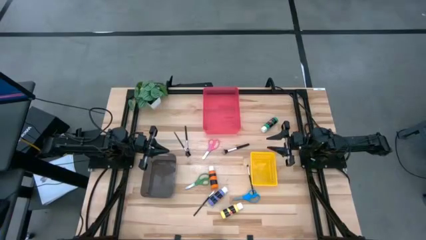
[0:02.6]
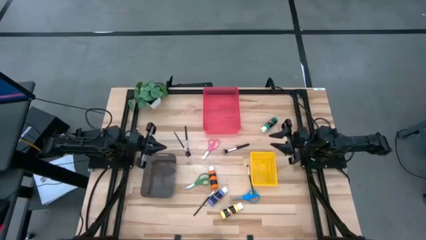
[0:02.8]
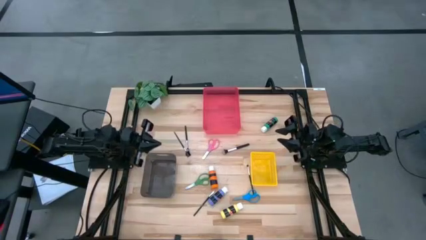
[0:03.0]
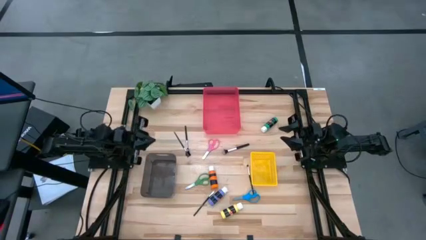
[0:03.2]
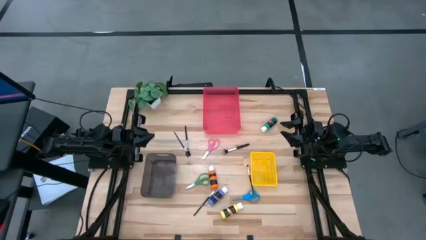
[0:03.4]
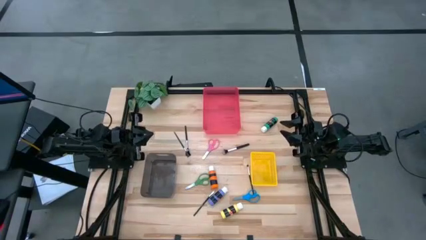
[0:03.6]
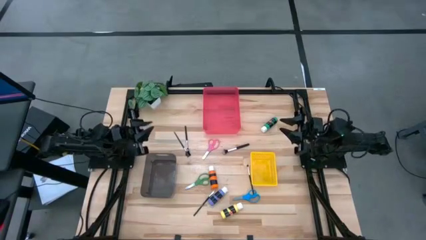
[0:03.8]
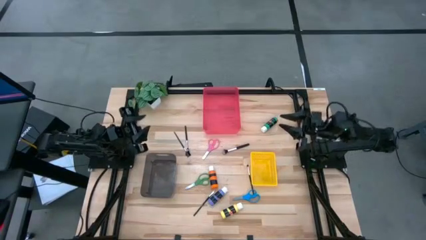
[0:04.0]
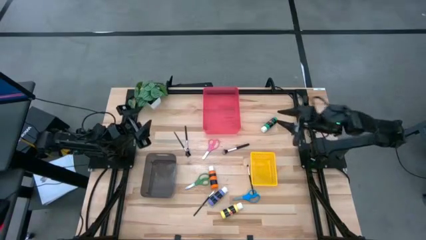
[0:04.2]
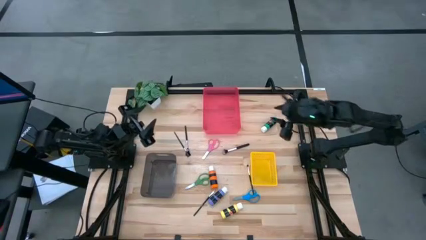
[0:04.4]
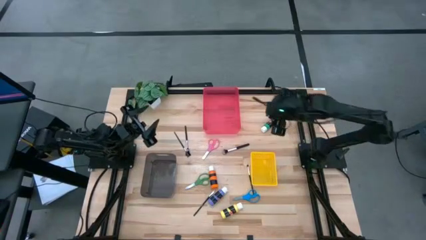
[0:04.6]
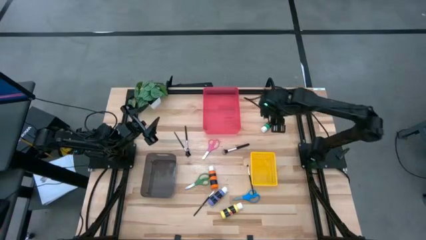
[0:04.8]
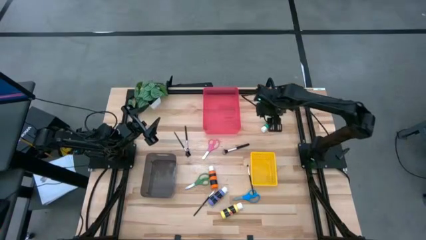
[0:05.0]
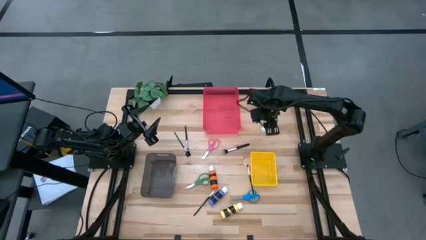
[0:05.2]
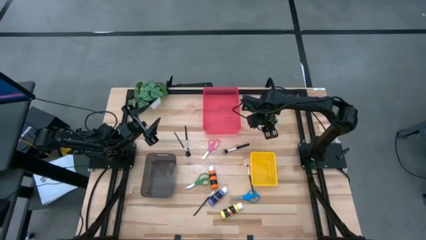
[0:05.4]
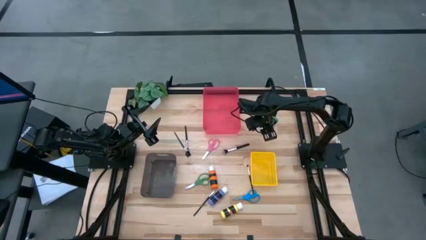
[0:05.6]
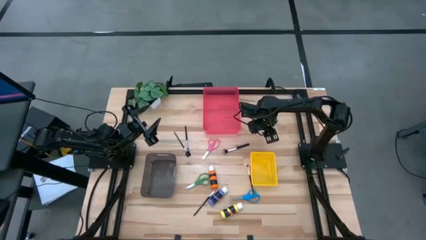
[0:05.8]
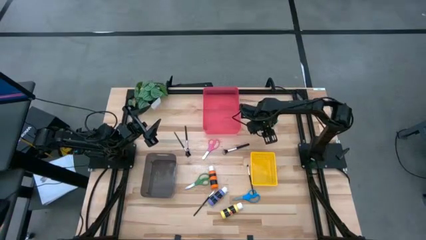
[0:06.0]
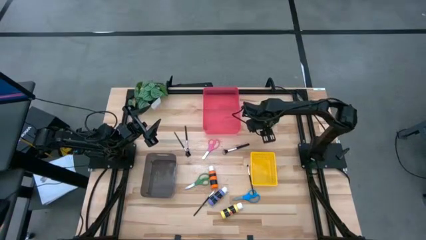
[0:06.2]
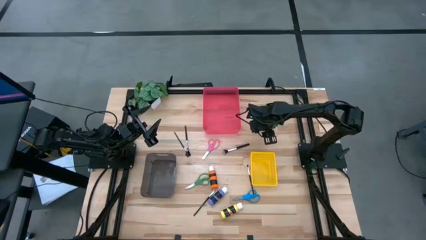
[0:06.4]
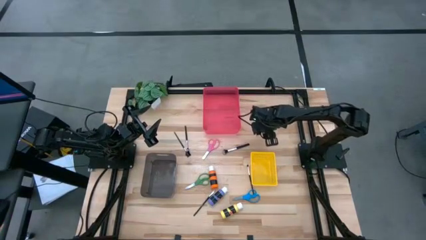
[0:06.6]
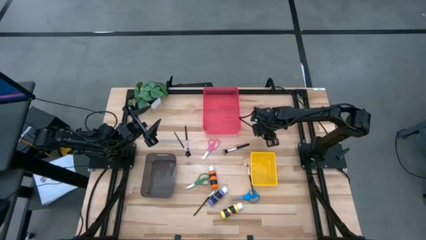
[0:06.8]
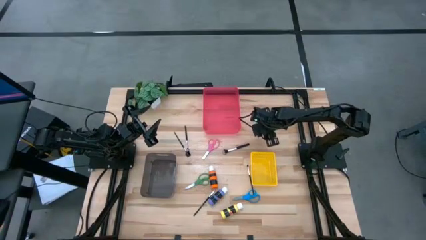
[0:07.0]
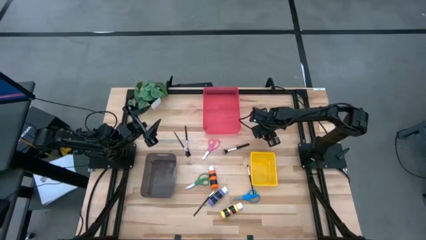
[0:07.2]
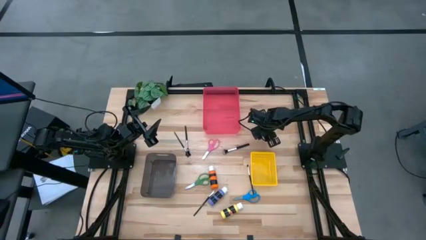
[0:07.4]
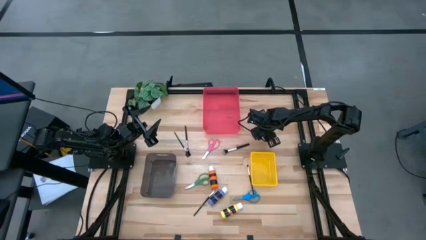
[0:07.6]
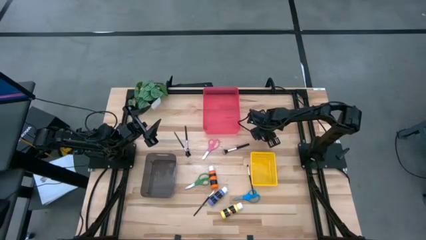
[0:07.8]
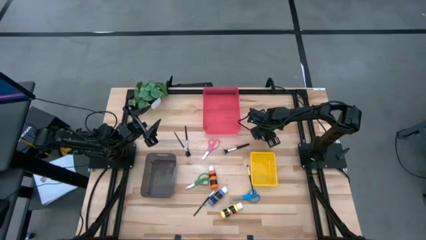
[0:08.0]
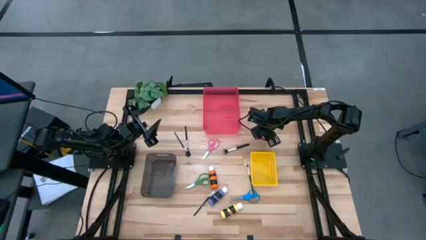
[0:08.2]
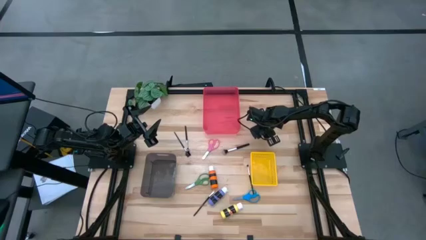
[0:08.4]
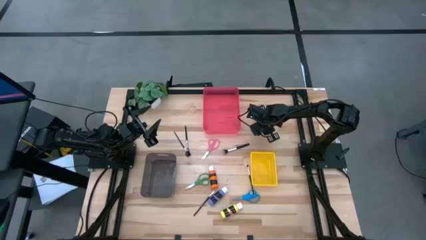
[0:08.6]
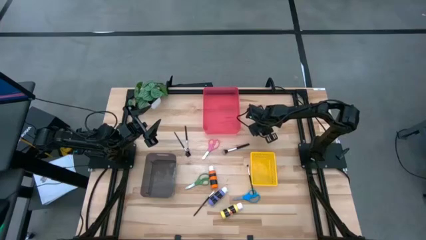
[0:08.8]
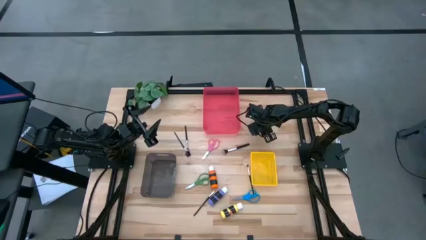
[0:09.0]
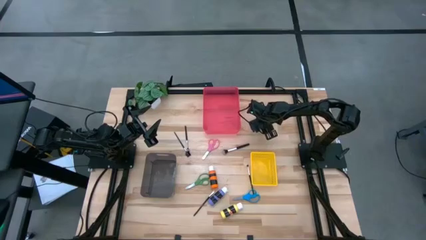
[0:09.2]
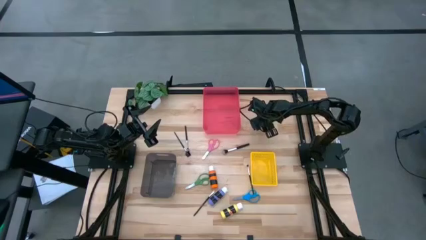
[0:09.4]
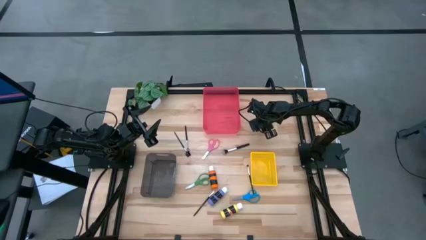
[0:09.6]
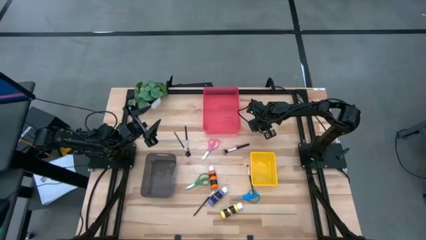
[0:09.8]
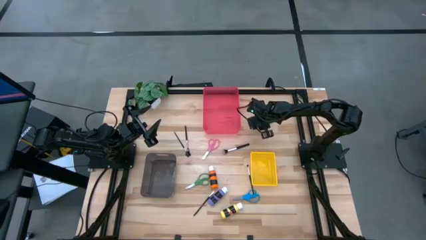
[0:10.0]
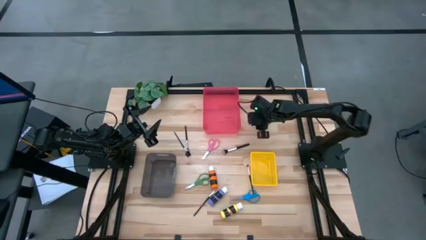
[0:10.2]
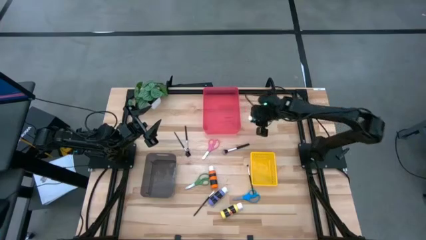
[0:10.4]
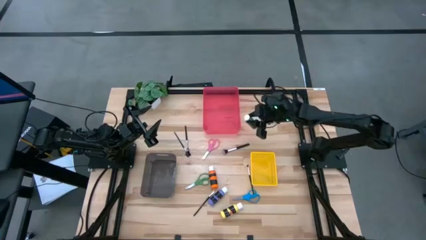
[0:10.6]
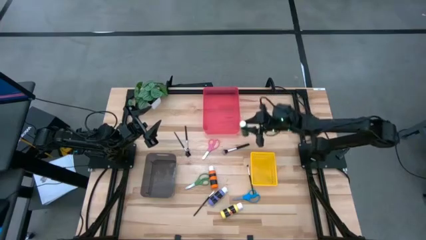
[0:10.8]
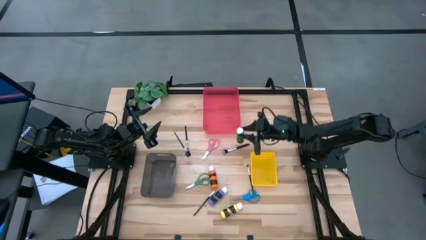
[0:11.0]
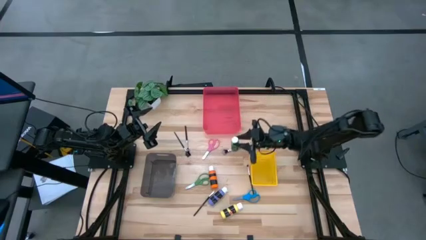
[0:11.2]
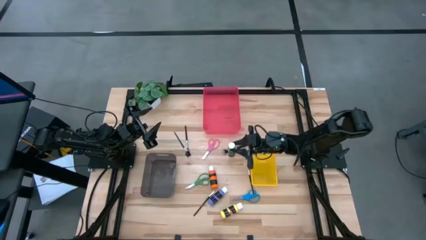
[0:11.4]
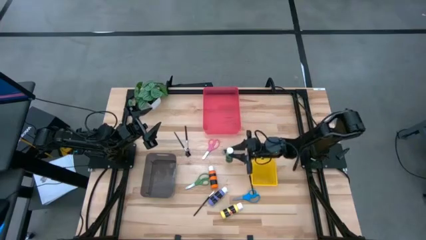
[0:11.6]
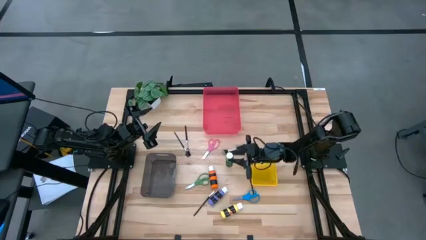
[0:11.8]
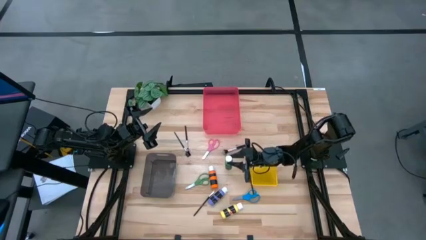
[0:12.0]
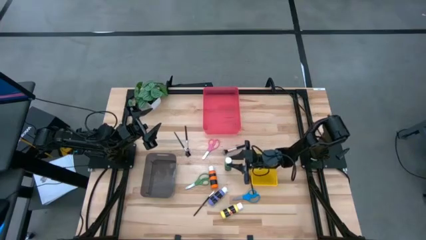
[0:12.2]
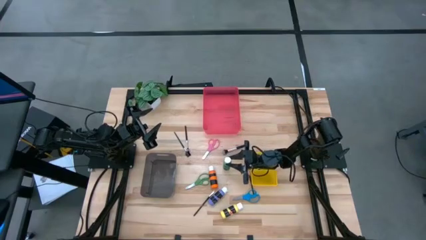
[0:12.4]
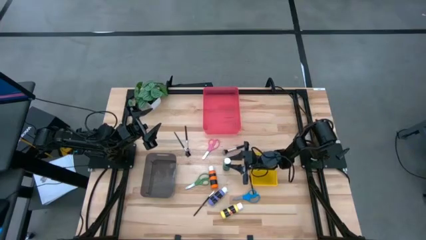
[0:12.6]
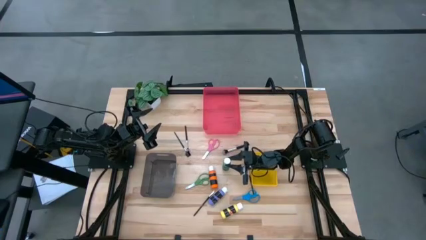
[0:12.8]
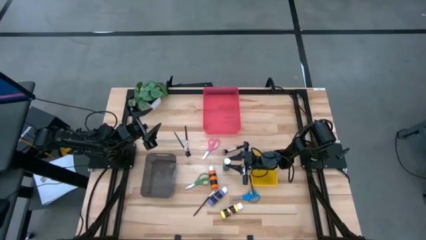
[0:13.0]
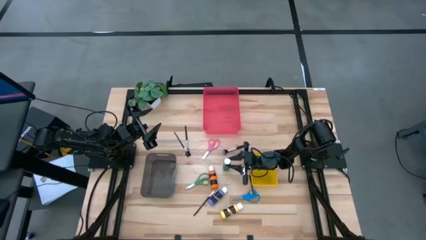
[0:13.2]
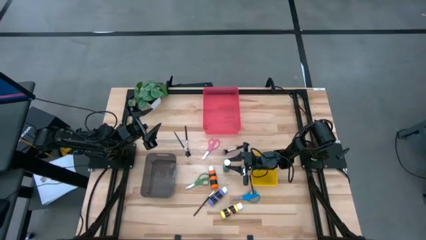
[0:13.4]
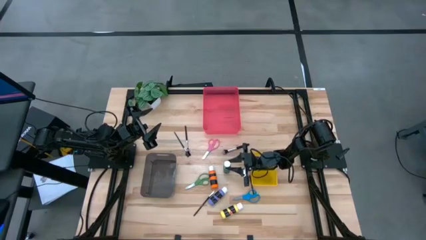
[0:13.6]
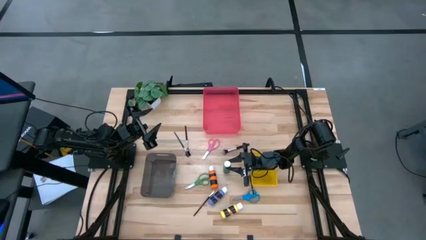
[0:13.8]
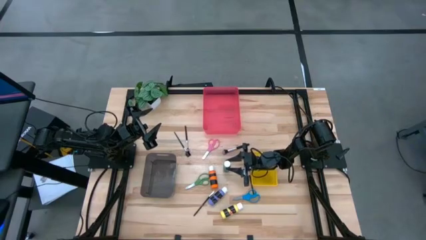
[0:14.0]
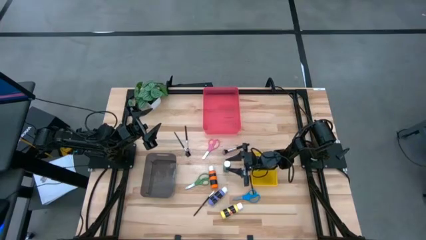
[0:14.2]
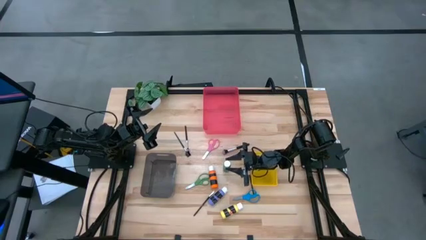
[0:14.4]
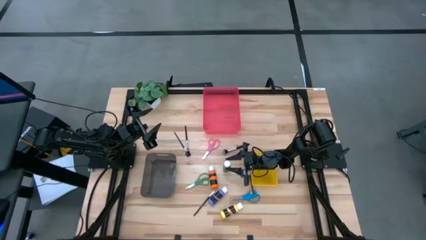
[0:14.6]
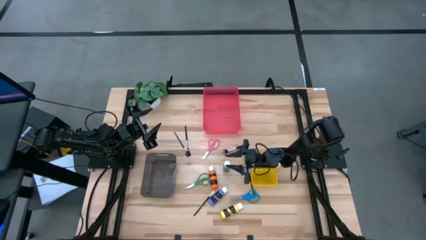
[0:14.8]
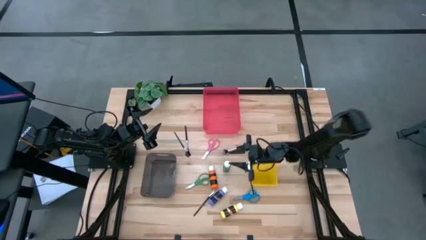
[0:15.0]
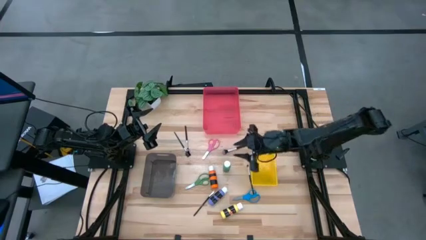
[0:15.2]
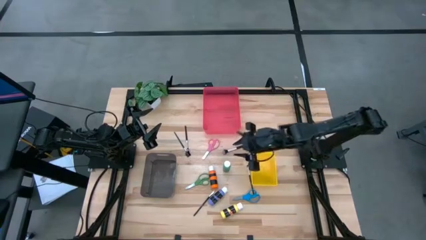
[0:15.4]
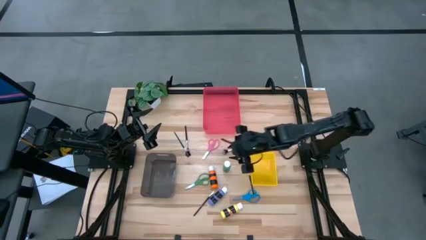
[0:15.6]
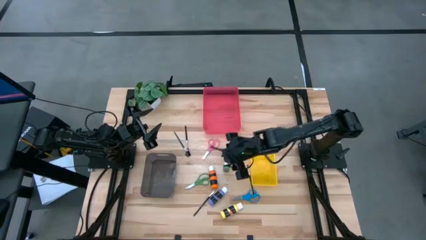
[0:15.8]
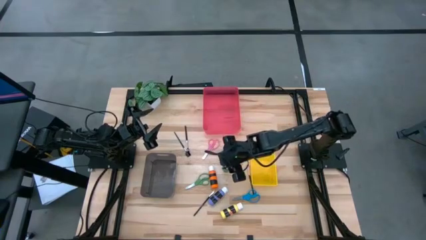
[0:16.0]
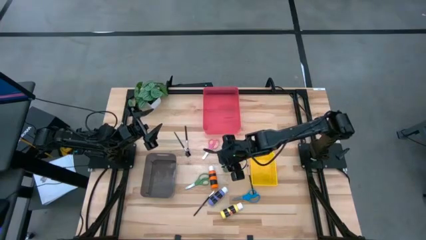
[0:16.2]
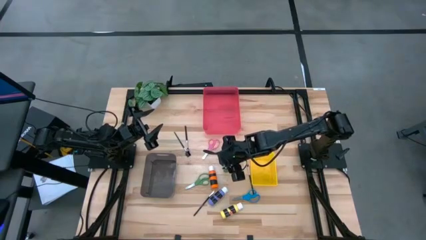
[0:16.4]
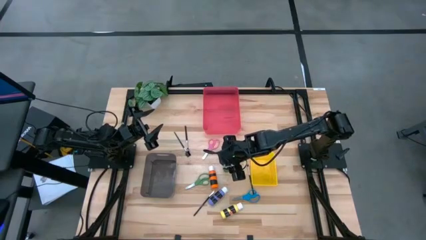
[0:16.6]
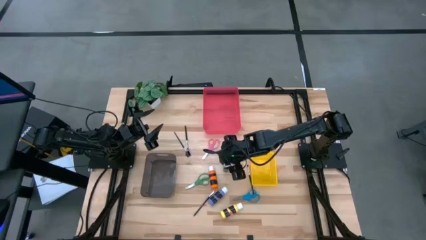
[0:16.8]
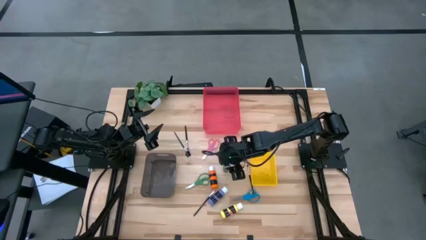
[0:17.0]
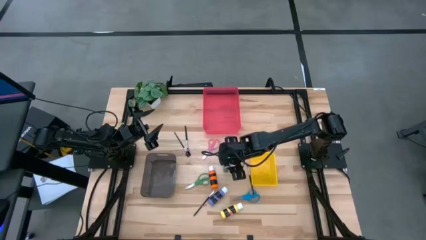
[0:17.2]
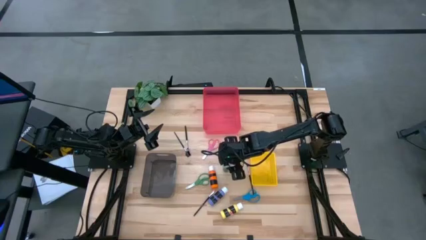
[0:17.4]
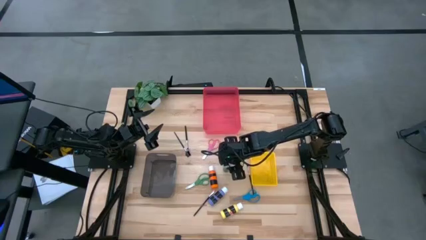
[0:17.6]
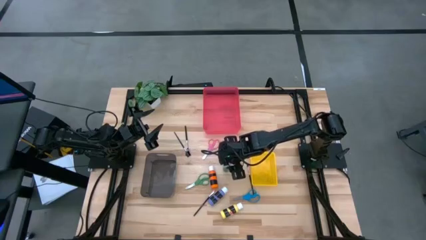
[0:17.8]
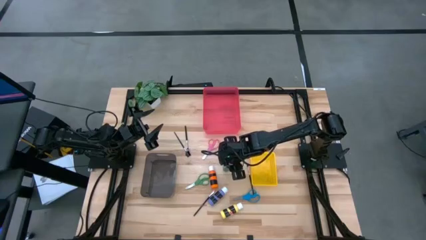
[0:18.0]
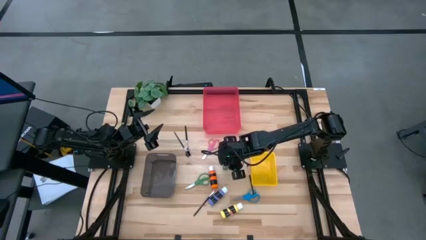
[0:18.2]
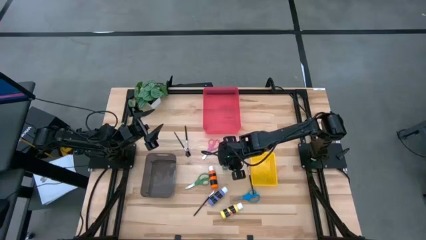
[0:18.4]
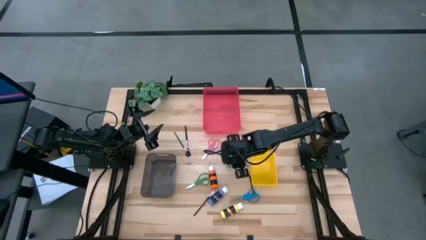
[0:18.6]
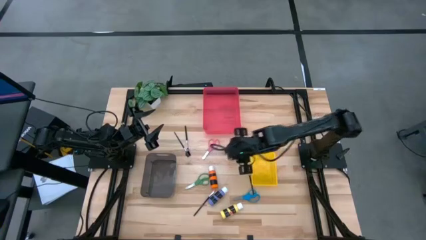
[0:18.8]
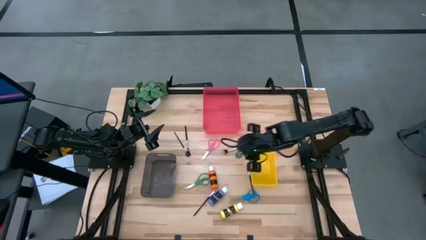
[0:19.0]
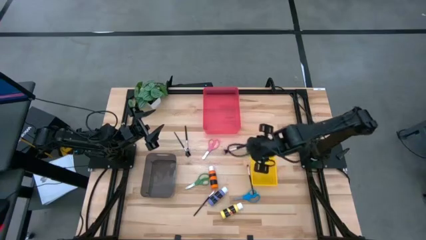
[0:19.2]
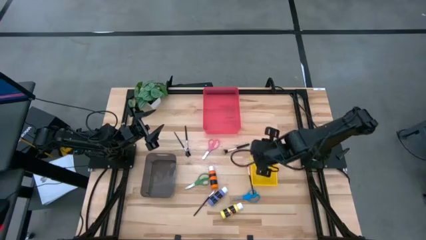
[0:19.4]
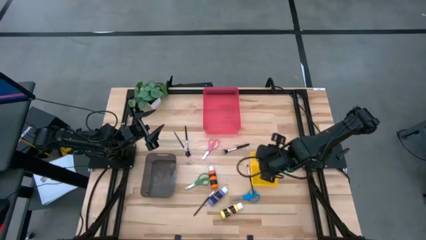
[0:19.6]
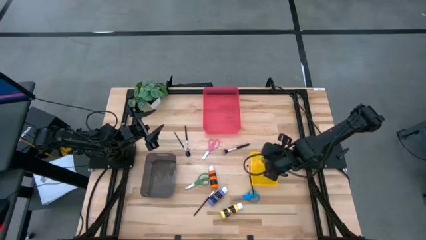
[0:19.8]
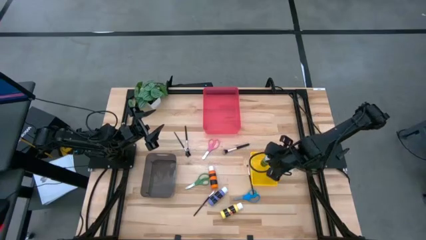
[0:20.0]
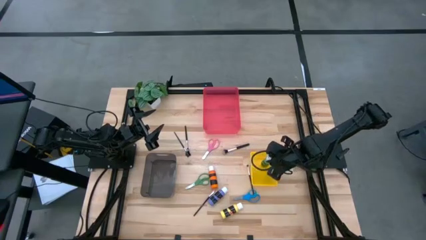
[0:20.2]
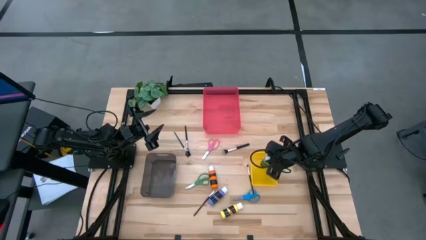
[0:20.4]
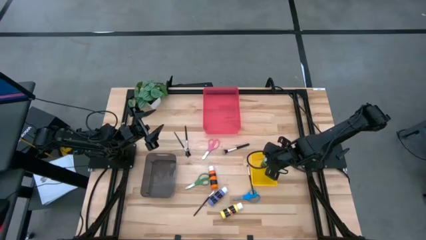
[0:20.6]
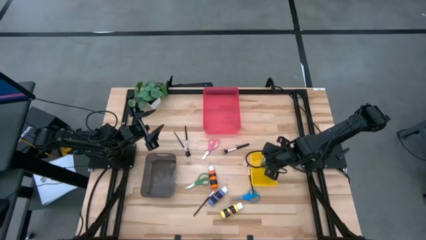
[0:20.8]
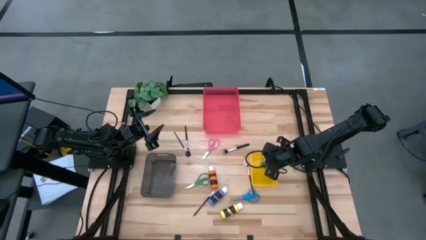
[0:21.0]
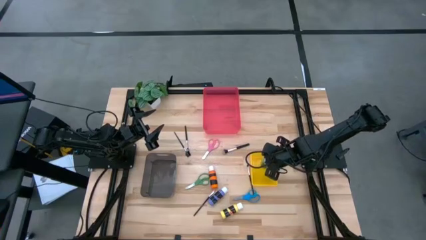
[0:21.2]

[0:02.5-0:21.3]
Task: Pick & Place Paint Supplies
Put the green paint bottle into the yellow bin
